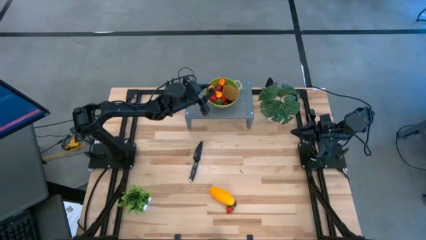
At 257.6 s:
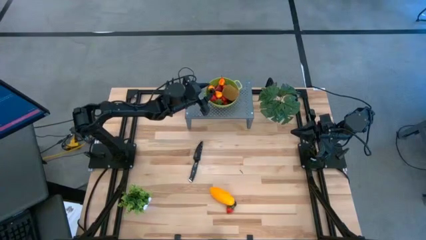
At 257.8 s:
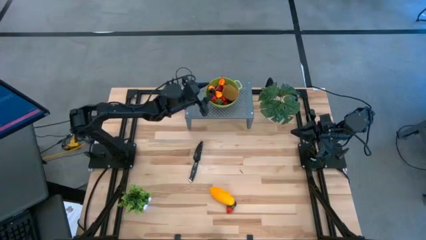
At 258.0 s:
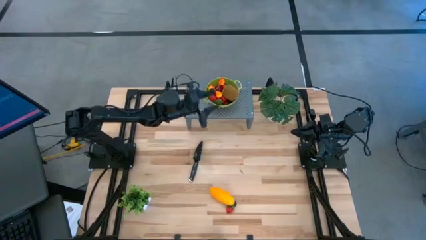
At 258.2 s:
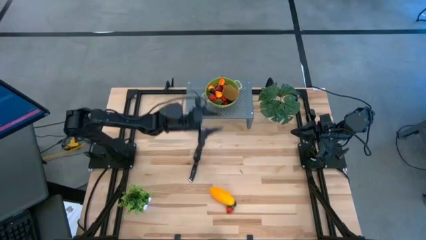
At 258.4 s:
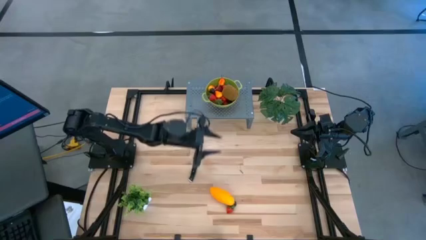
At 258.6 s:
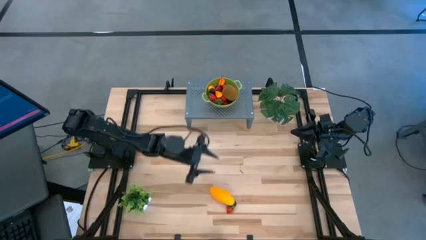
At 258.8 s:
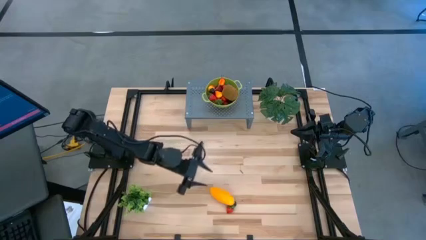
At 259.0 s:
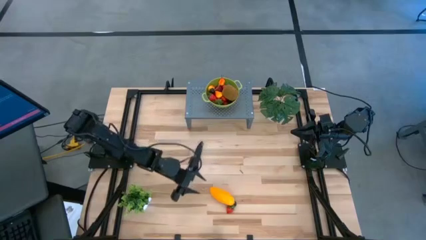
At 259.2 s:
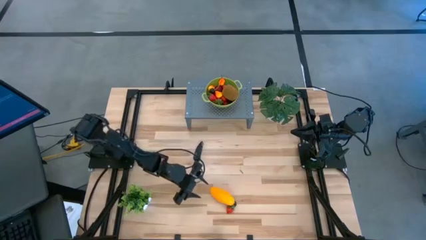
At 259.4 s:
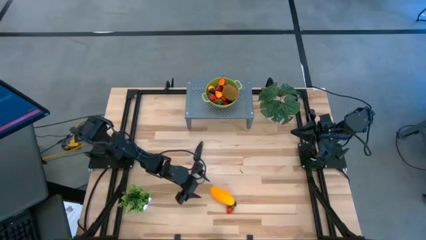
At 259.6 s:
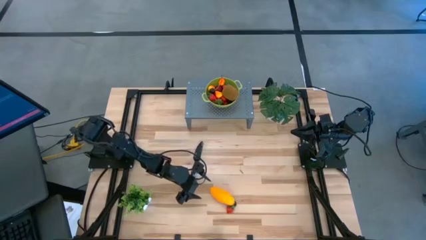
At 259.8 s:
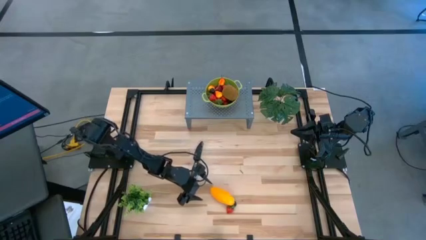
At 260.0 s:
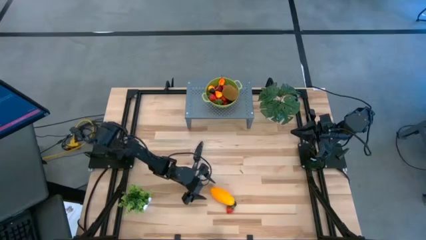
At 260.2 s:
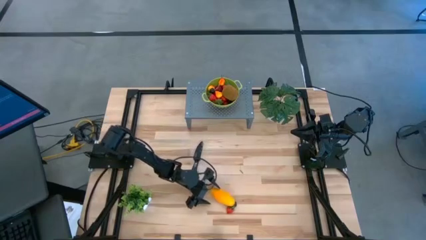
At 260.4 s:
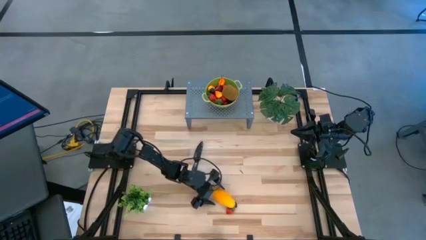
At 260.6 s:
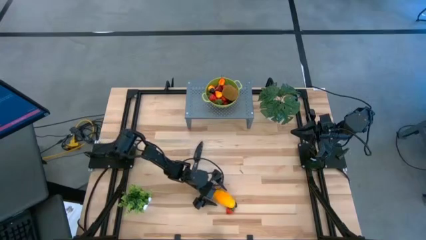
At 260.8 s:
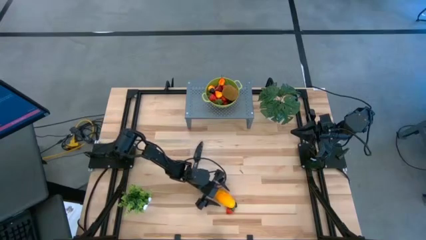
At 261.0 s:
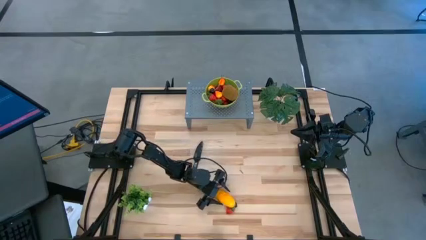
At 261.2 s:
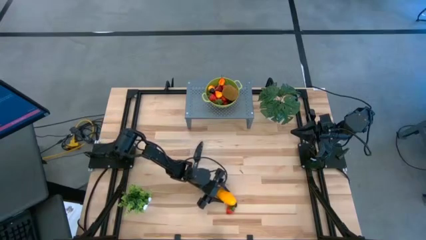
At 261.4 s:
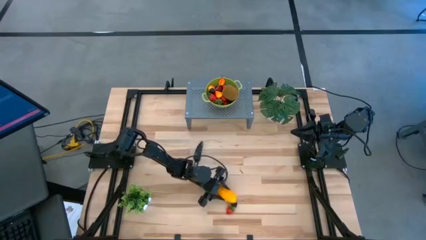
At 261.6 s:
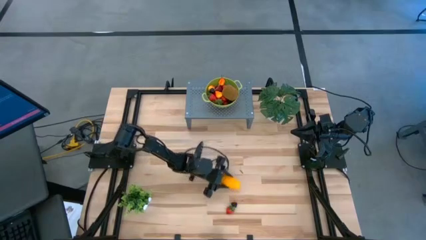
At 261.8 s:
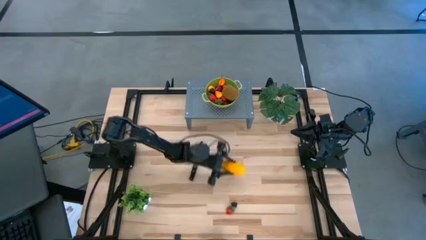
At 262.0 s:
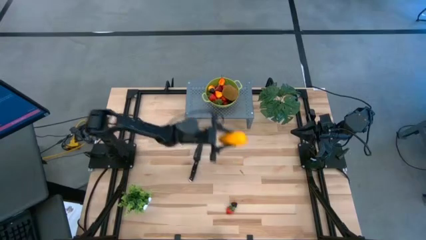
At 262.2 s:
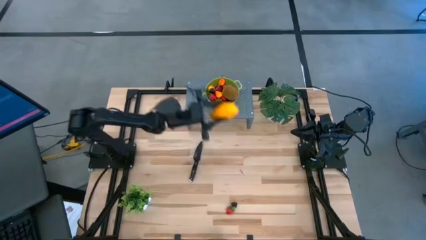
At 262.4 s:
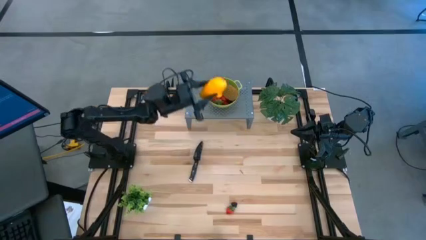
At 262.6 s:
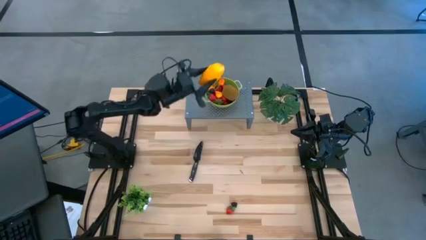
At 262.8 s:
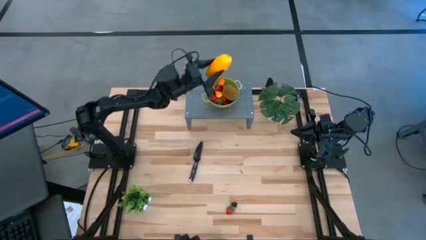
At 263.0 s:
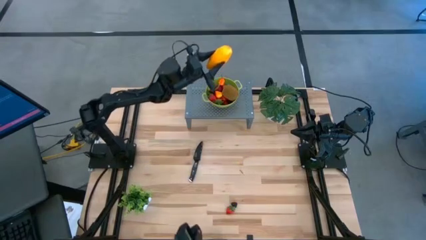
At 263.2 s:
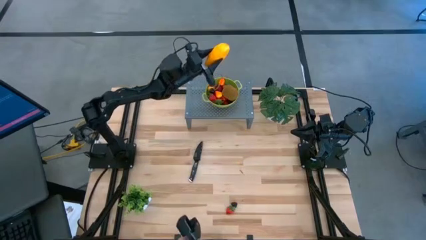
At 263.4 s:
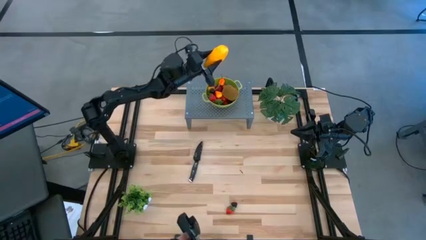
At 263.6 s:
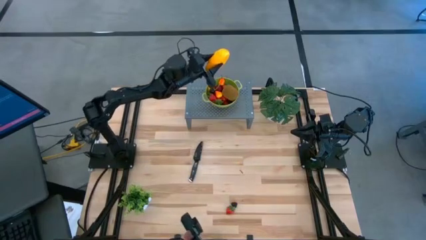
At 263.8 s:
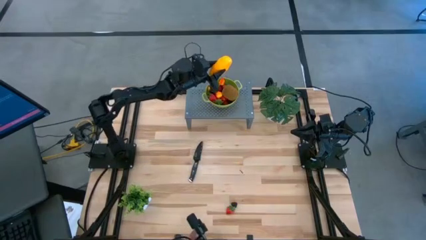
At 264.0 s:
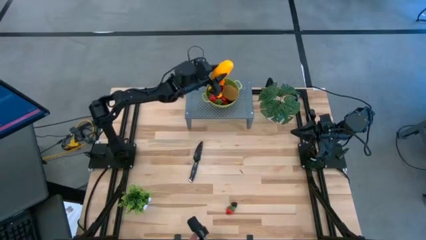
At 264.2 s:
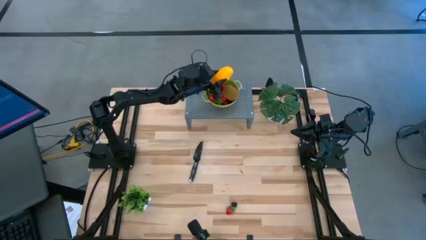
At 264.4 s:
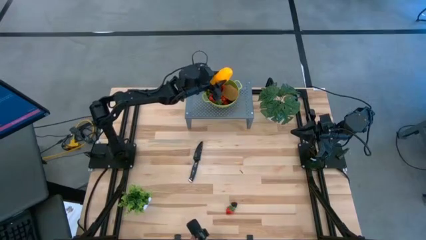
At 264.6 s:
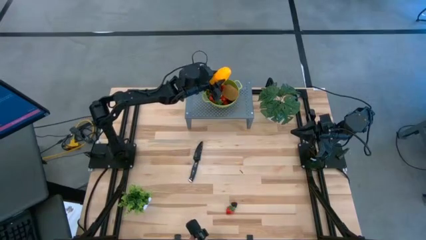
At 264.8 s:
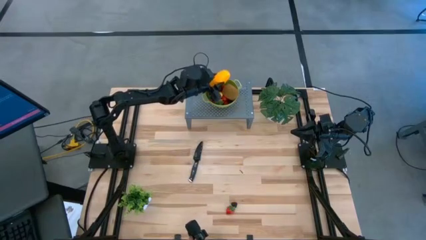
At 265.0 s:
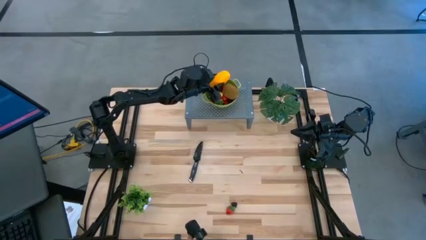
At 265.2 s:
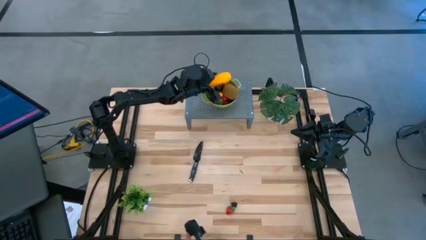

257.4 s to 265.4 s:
Task: Pick & Place Fruit
Put the mango into the green strainer bowl on the shelf

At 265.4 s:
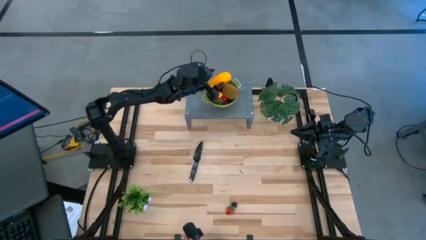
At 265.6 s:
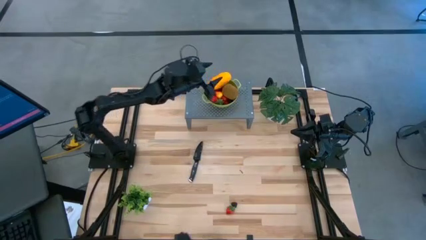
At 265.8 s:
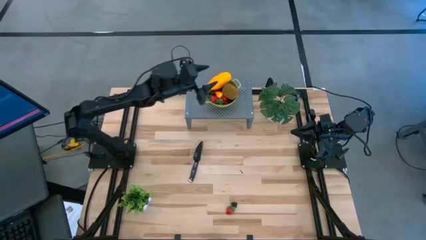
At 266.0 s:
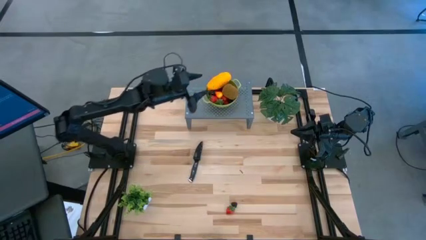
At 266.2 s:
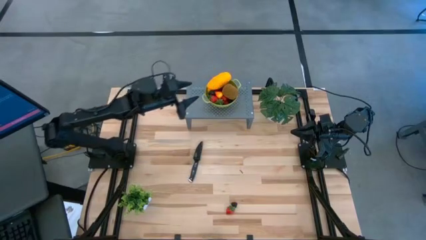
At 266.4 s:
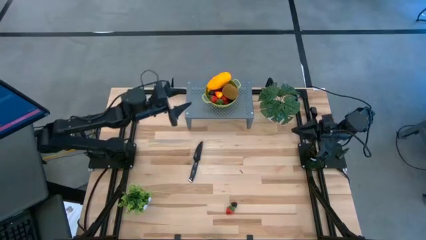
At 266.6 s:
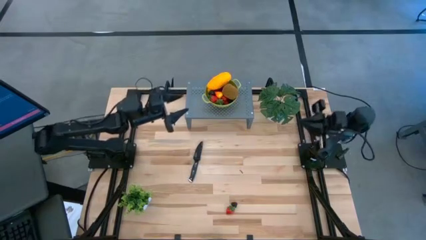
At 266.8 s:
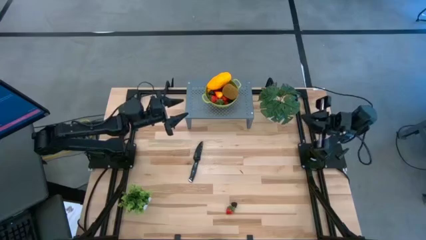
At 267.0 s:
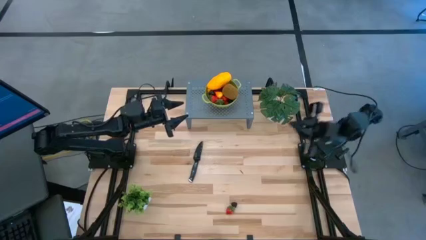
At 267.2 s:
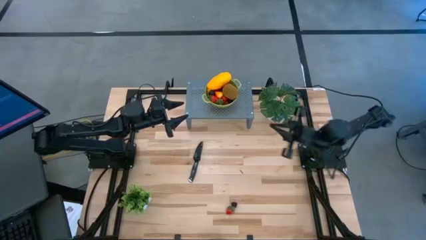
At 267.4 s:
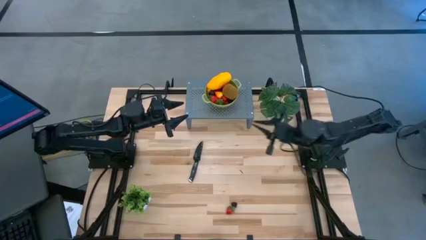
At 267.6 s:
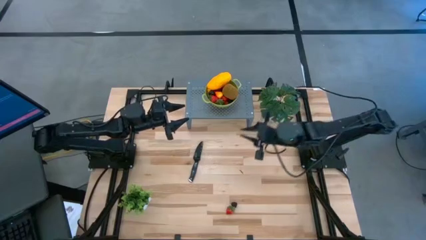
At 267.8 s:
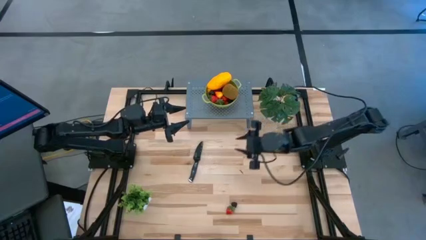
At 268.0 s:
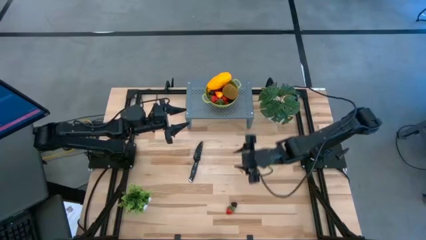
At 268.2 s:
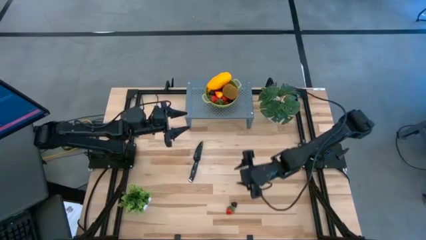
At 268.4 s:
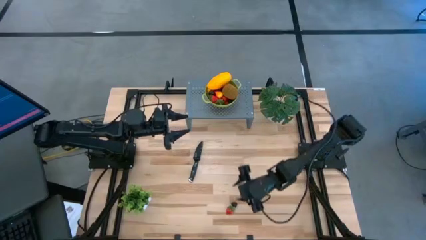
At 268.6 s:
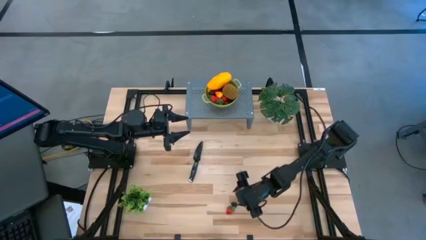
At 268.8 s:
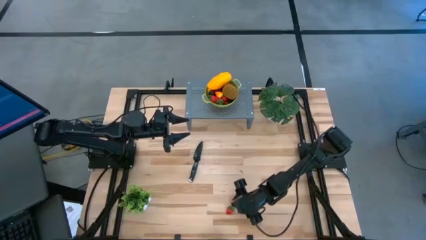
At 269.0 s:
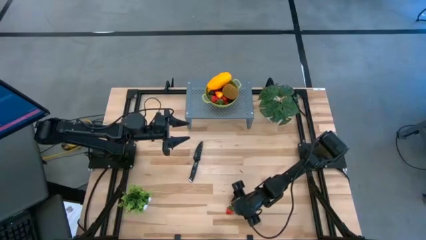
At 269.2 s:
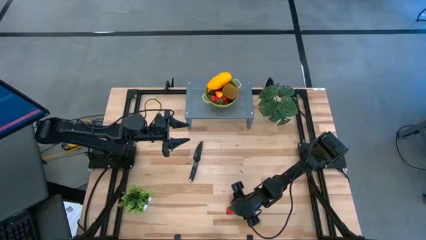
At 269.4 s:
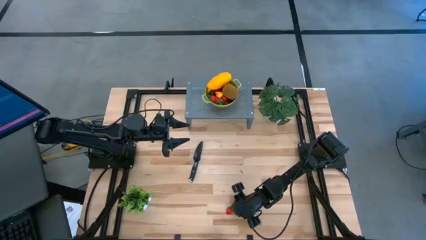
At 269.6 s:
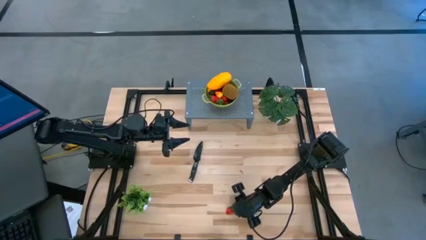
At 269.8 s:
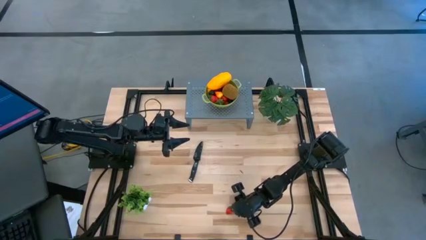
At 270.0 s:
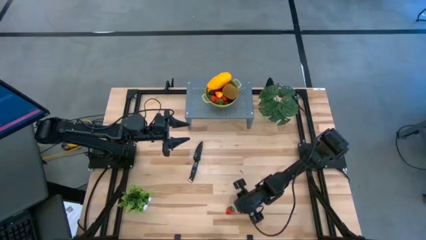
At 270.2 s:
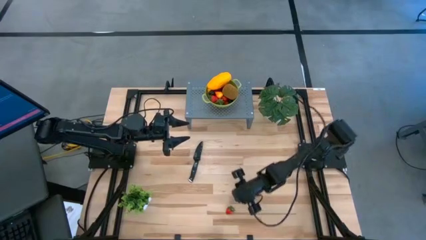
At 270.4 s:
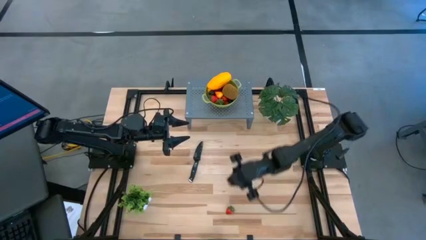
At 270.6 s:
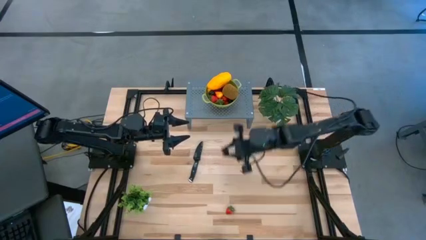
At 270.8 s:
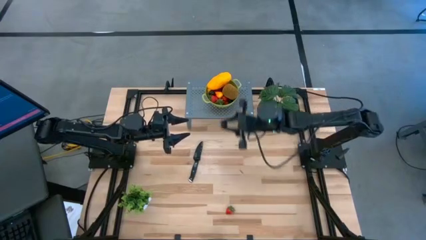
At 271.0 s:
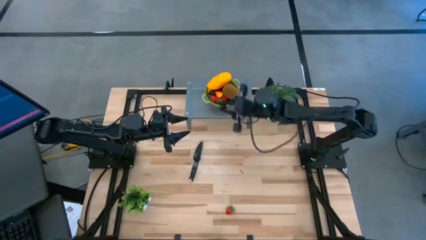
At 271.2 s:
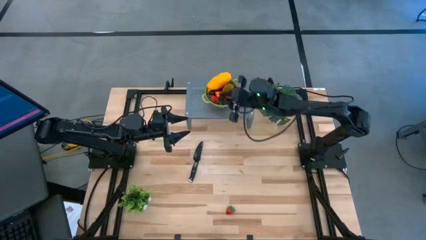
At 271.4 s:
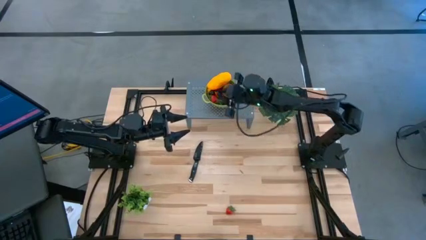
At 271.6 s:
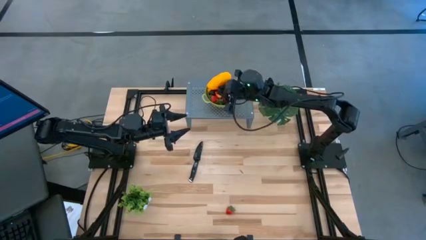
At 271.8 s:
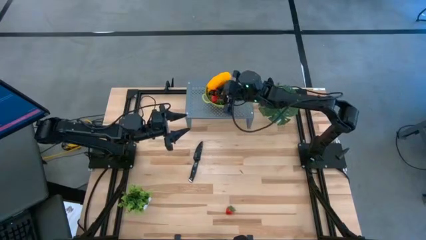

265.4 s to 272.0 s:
Put the blackberry into the green strainer bowl on the shelf

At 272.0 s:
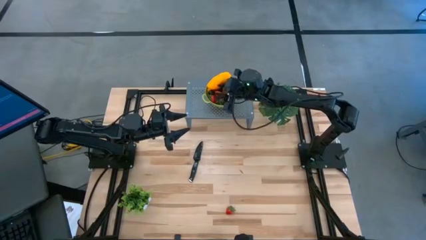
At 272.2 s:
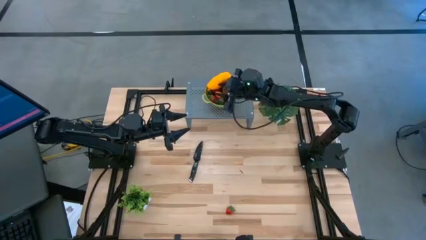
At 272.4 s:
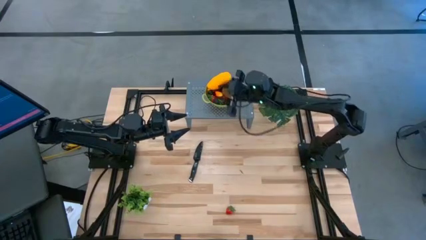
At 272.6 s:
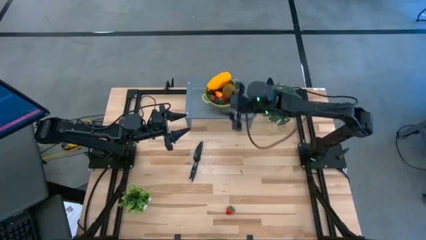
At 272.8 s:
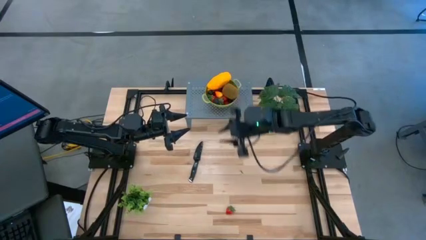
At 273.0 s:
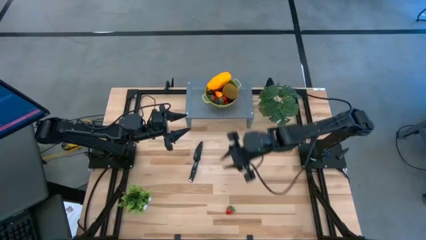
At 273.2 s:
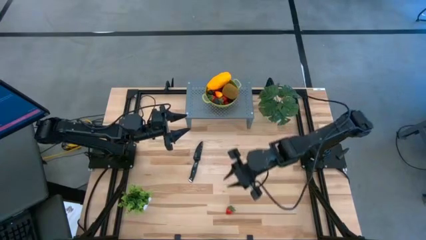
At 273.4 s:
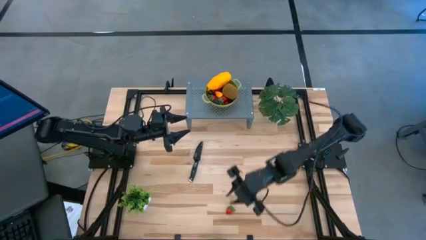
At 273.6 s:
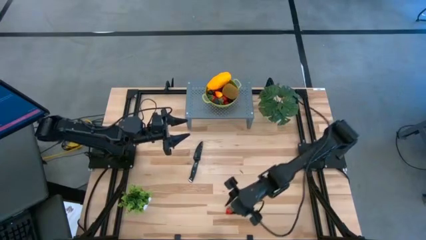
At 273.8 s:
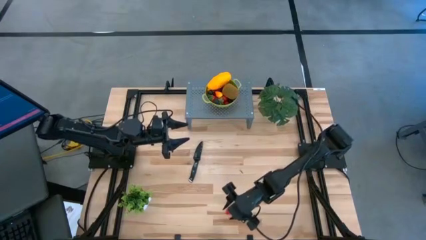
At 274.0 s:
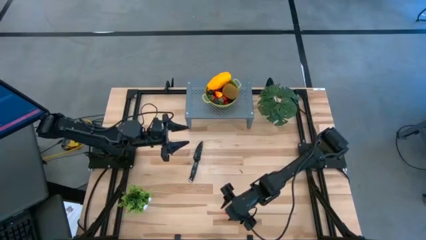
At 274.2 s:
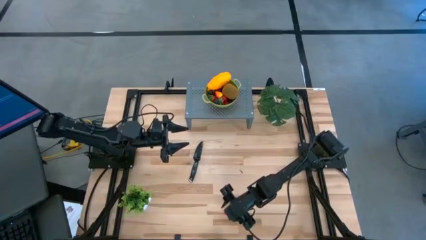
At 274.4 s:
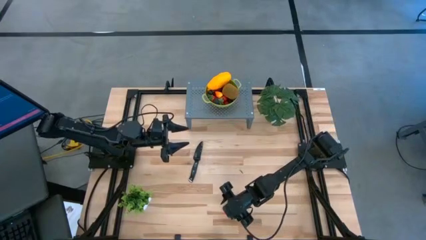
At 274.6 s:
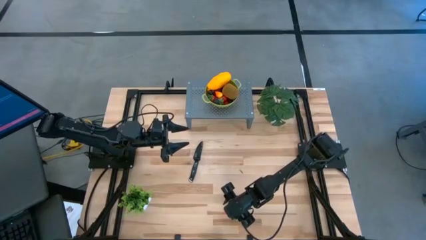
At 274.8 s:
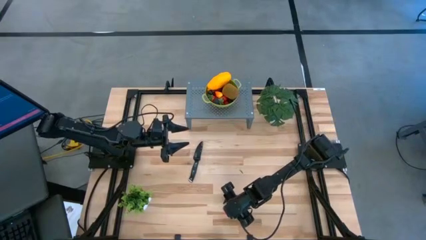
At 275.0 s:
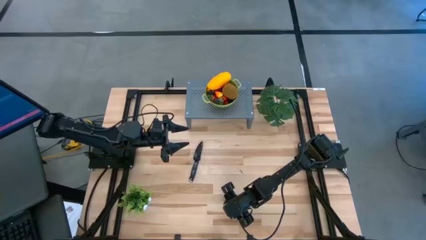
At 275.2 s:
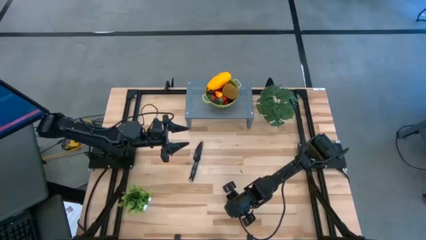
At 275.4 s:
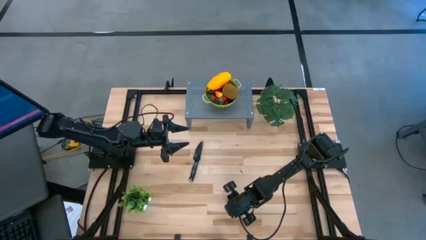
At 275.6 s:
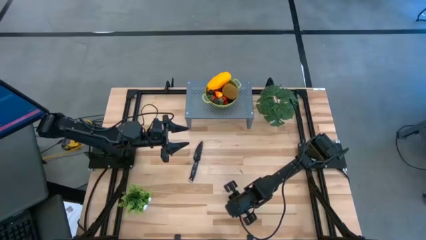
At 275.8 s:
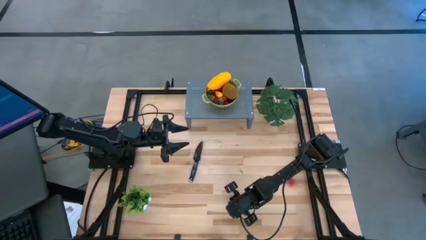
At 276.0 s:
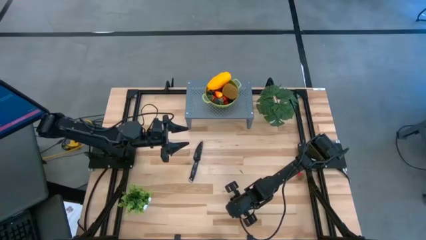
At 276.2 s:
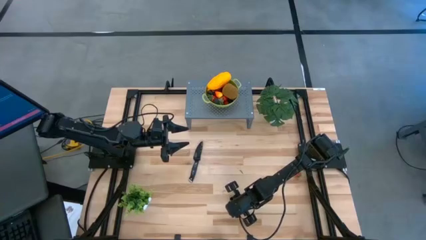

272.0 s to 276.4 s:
Put the strawberry into the green strainer bowl on the shelf
